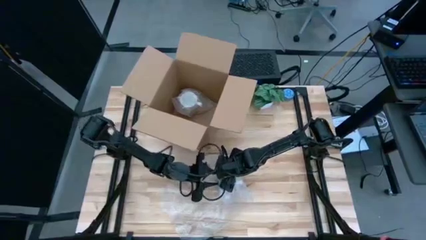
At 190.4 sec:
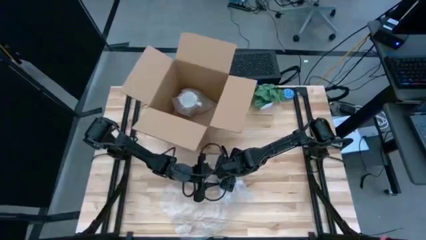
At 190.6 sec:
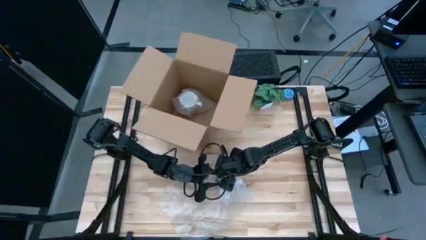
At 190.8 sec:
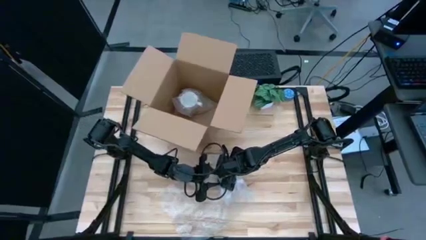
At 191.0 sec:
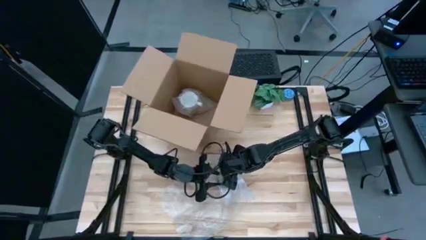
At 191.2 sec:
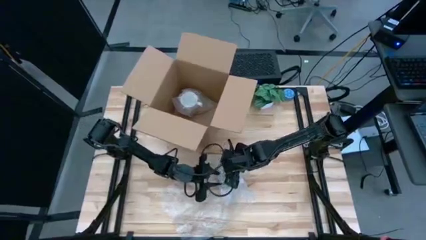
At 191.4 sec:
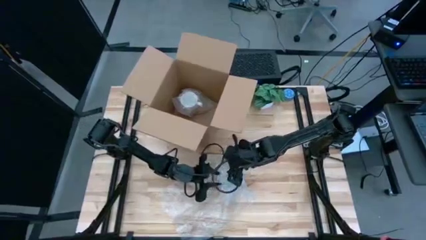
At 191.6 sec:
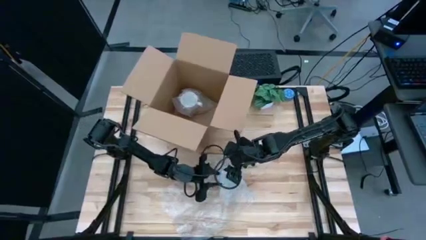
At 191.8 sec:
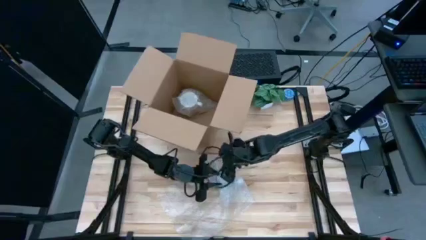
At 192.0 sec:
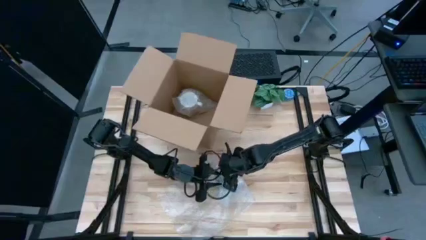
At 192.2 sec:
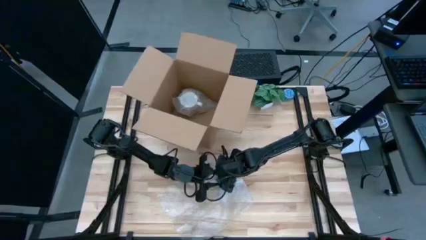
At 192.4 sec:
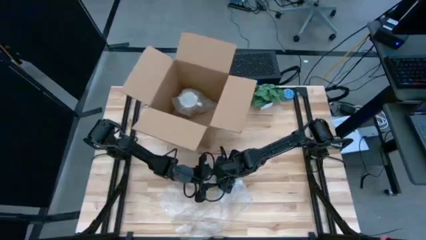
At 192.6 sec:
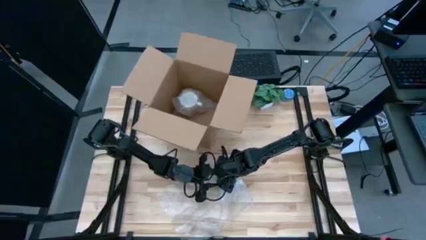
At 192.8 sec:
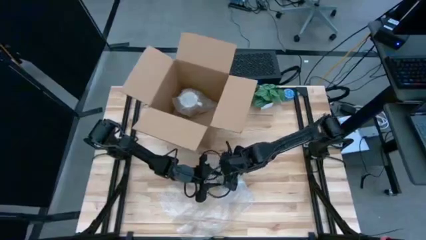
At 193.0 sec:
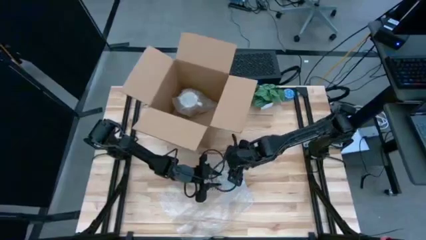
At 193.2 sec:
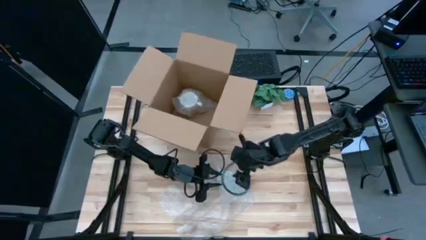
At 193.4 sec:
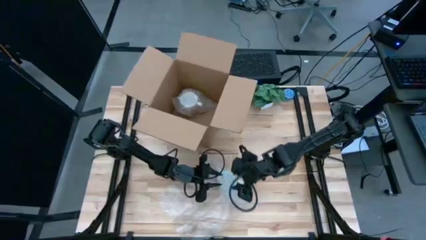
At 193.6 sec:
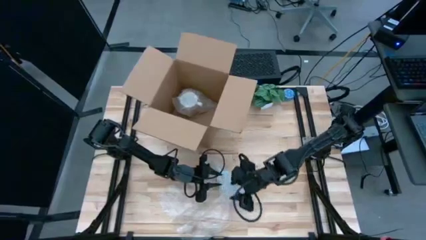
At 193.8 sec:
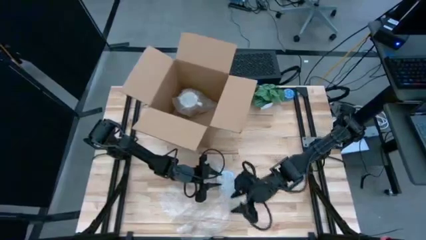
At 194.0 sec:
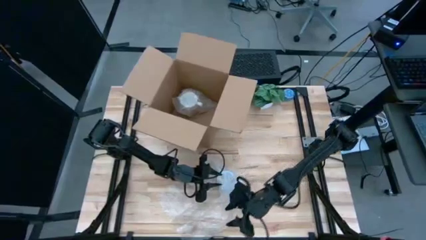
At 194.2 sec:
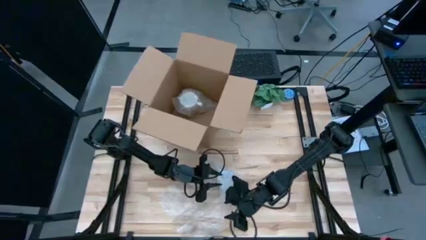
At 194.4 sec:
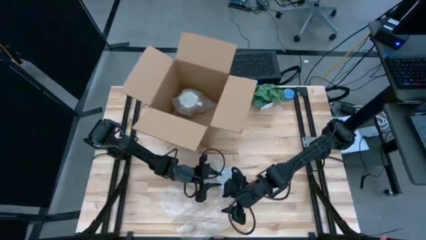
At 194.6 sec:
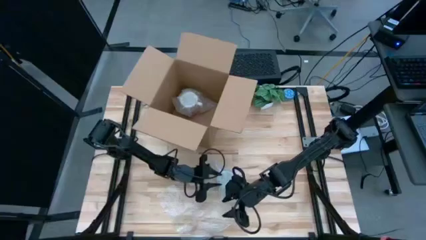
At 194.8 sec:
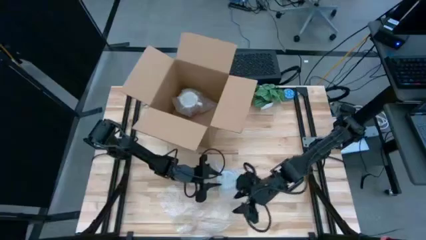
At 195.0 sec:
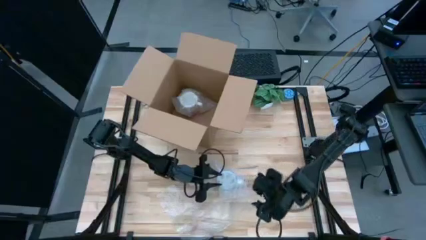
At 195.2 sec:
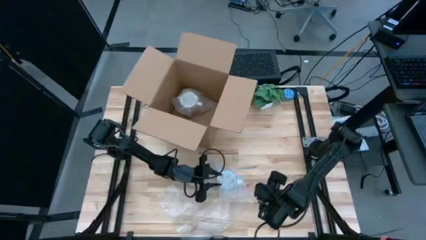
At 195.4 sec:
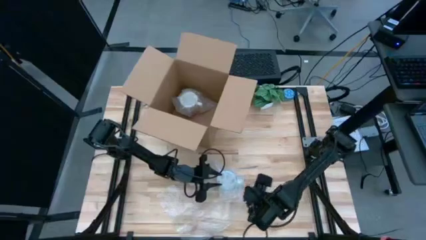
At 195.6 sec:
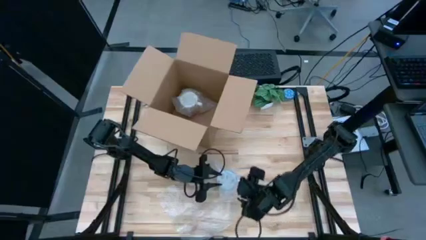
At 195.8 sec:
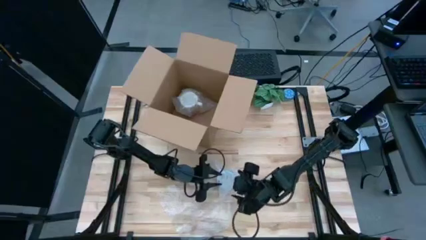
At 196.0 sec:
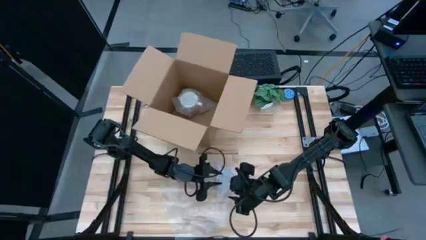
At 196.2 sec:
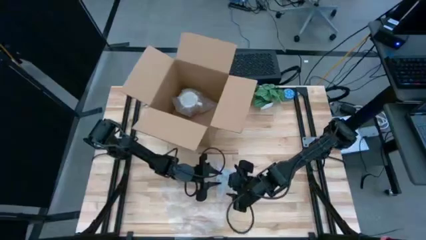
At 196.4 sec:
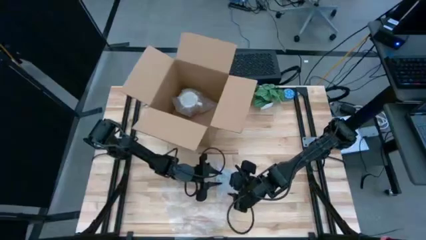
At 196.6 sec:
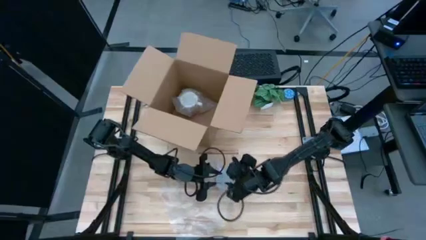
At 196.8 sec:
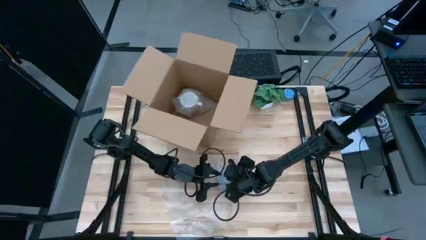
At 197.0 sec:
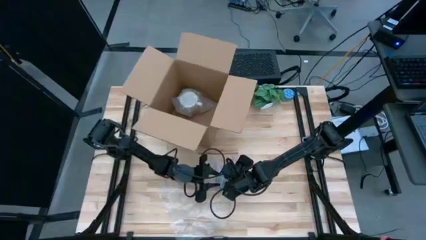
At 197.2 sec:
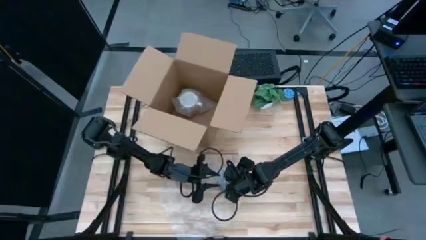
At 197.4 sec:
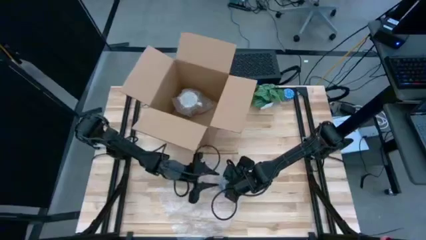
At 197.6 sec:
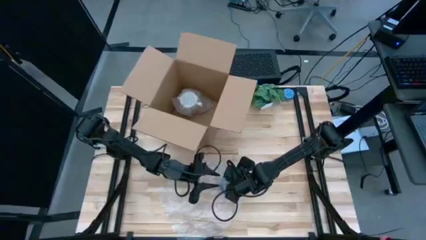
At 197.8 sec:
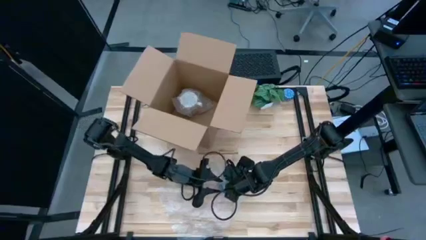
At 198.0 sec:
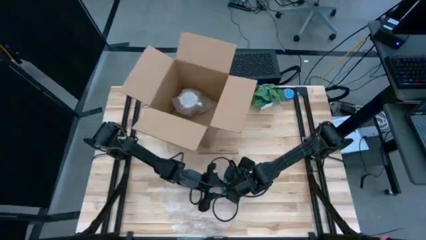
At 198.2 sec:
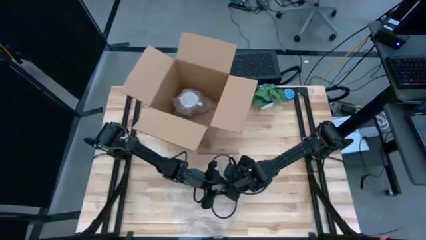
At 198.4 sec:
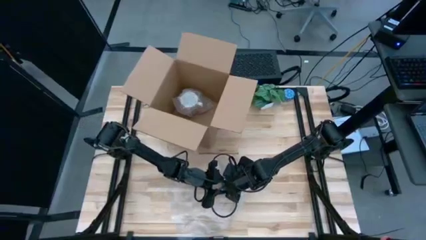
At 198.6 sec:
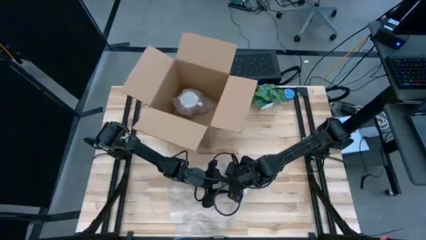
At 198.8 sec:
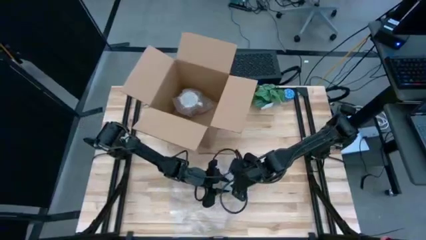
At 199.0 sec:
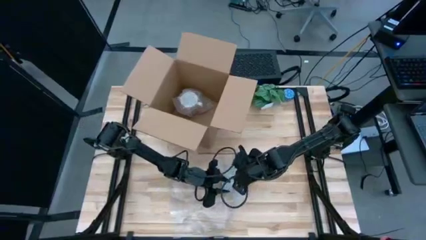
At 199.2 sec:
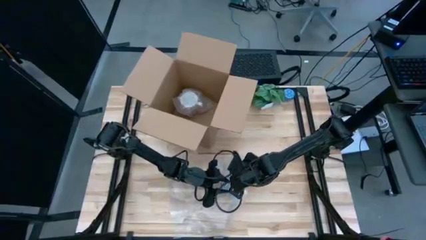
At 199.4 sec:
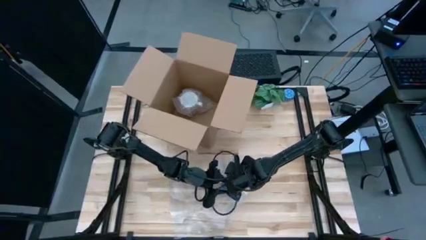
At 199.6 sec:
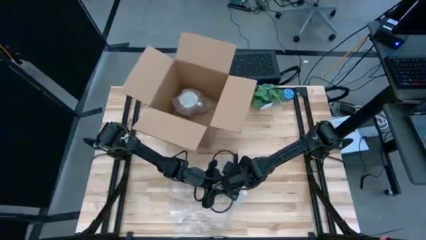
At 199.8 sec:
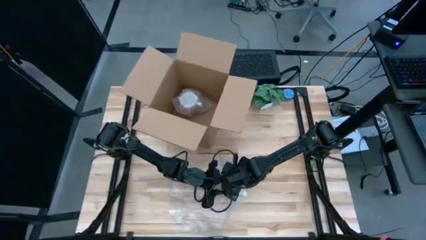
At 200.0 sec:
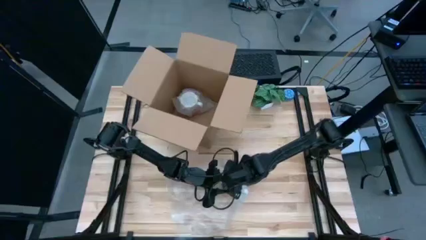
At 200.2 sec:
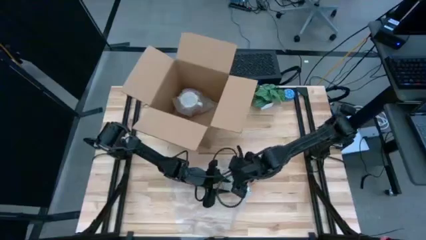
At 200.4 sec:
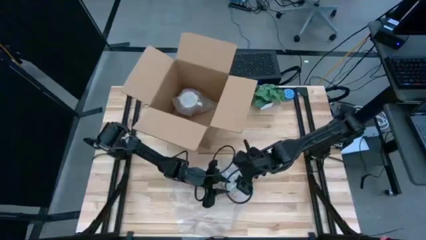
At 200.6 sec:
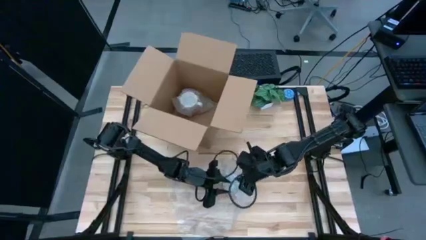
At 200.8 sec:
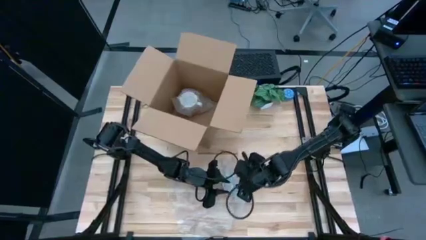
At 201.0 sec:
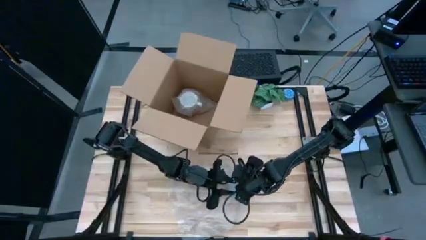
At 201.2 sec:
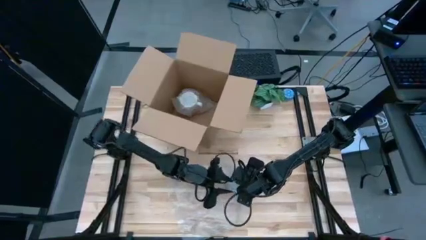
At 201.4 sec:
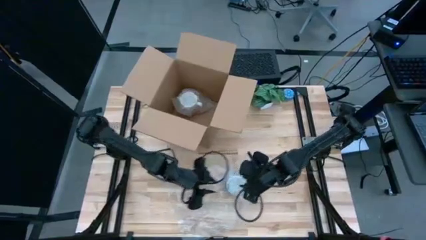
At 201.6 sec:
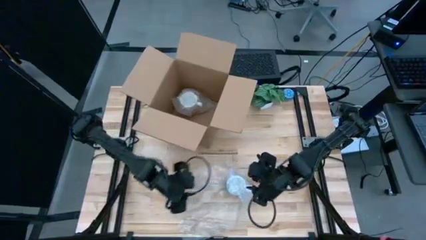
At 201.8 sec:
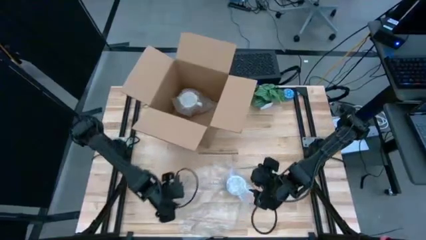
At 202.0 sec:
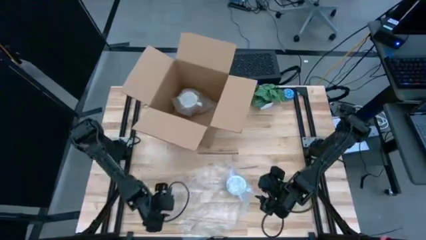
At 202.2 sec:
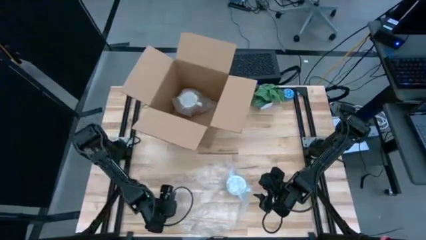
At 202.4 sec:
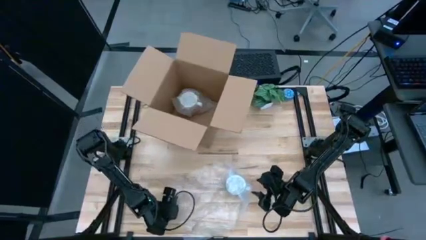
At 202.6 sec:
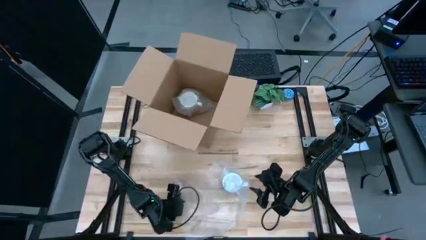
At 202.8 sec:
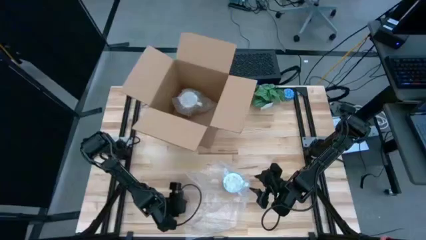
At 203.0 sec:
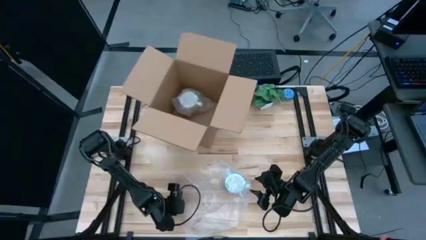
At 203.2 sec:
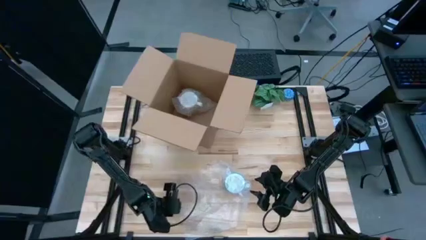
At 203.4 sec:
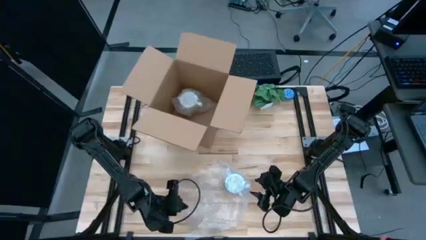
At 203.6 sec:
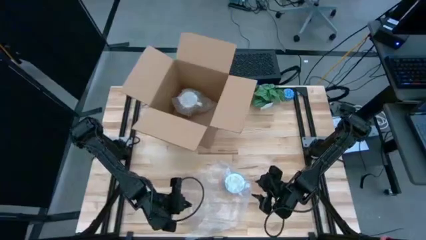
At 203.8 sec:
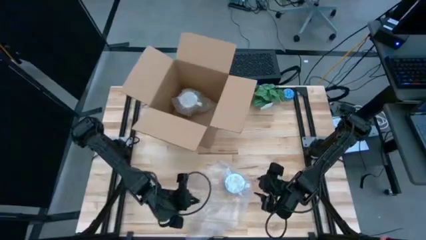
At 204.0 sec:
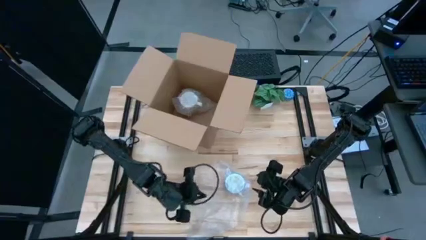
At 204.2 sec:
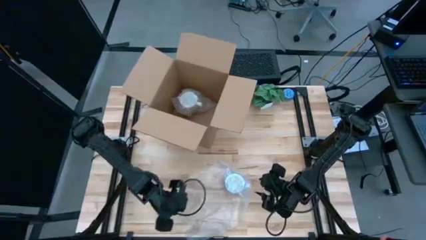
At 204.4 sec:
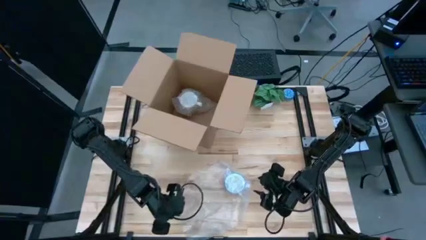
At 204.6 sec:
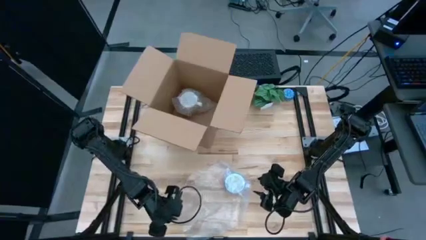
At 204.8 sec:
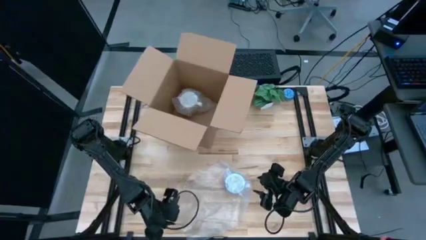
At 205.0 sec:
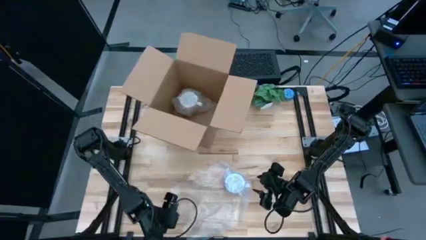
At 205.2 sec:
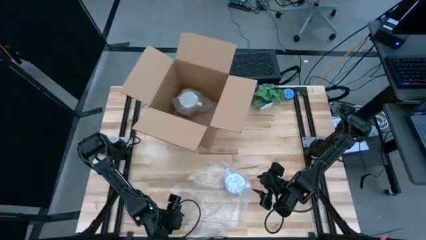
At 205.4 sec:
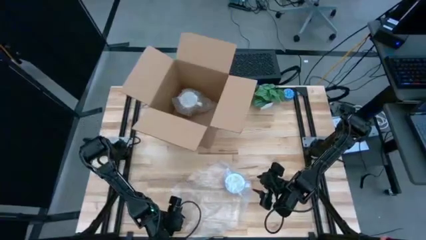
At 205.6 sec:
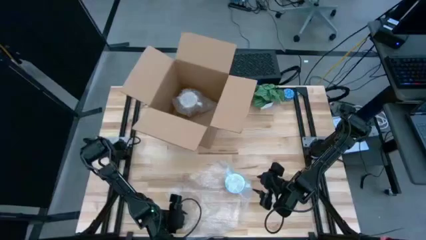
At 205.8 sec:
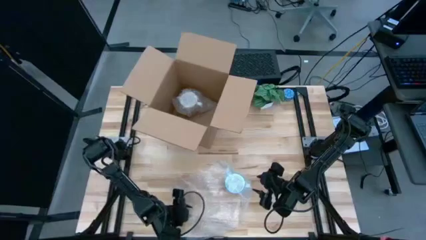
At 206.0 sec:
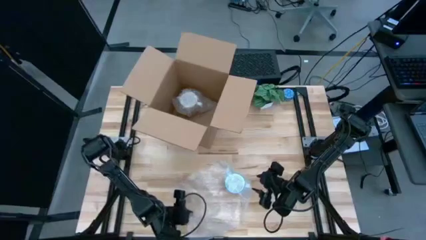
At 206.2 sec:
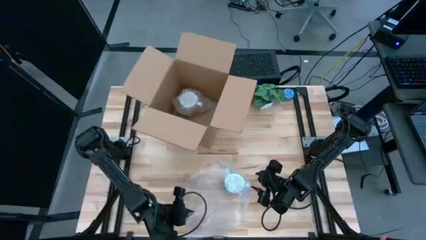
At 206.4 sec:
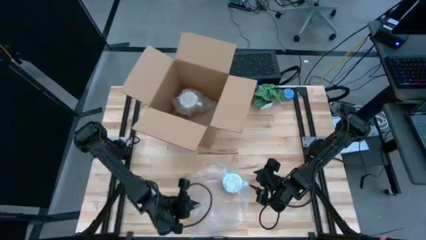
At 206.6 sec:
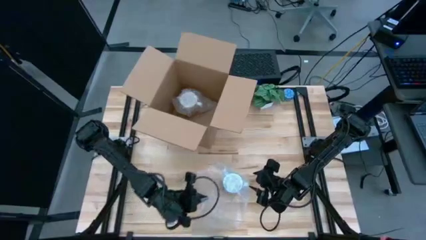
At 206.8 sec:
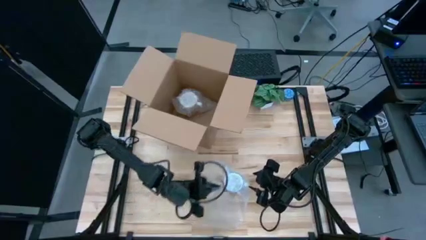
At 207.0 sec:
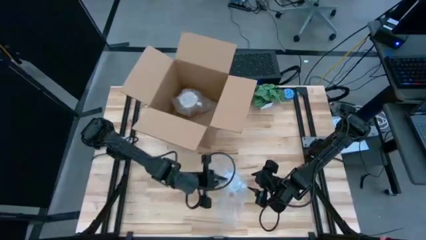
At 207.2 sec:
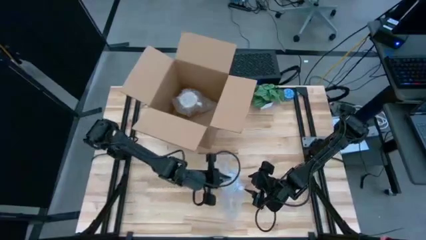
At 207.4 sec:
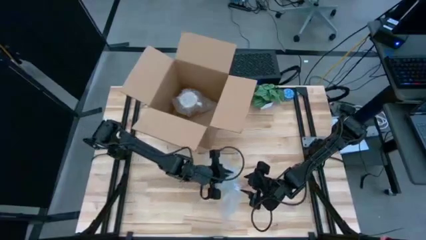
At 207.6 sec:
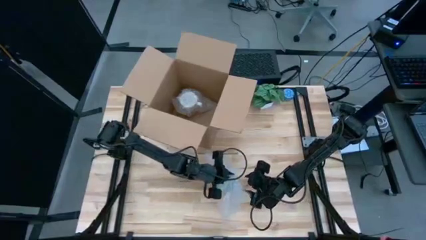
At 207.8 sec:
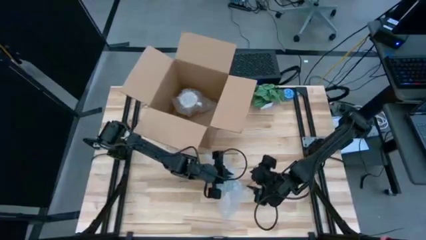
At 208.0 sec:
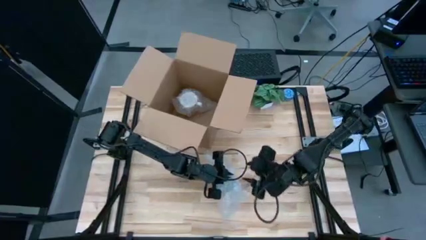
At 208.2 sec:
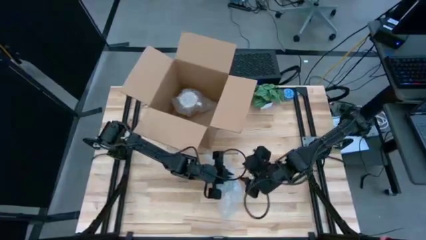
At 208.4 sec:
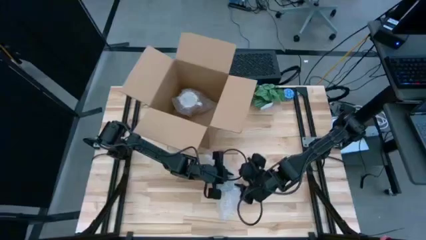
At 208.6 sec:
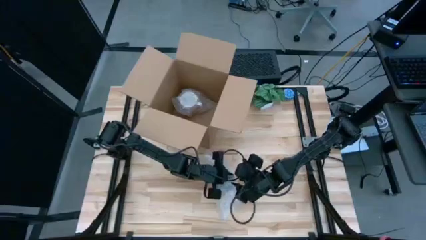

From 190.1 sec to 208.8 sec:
Task: wrap mug
Wrap the red mug with bubble wrap
